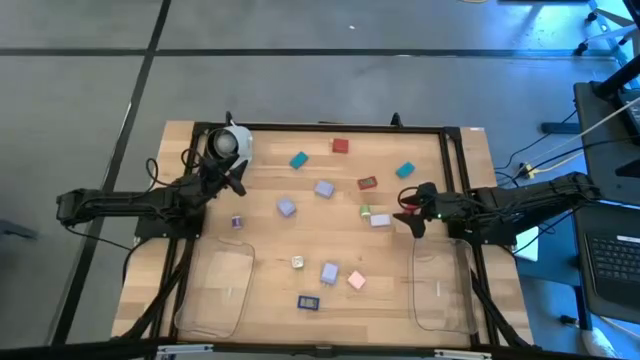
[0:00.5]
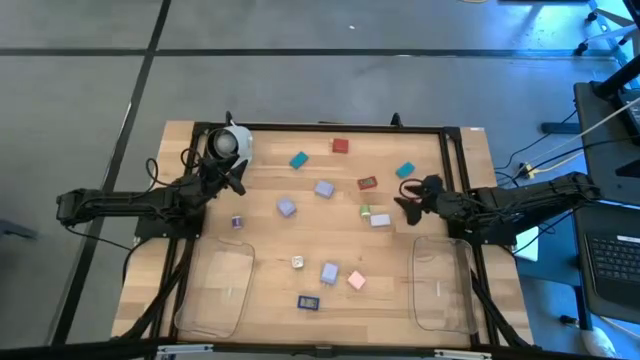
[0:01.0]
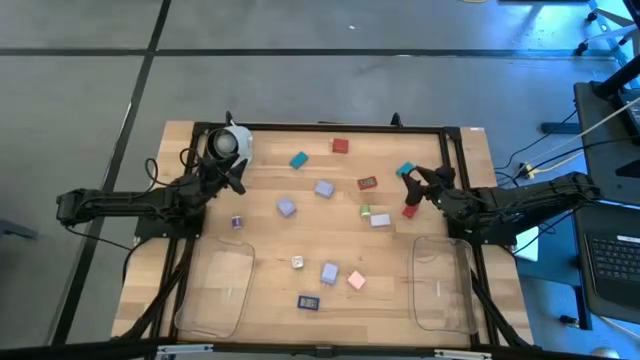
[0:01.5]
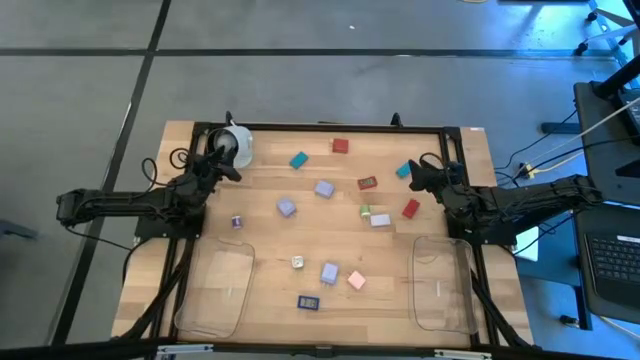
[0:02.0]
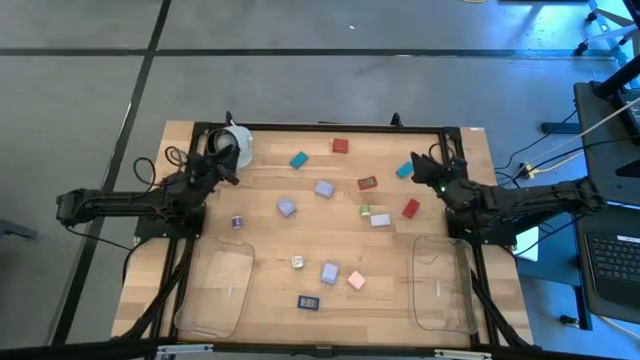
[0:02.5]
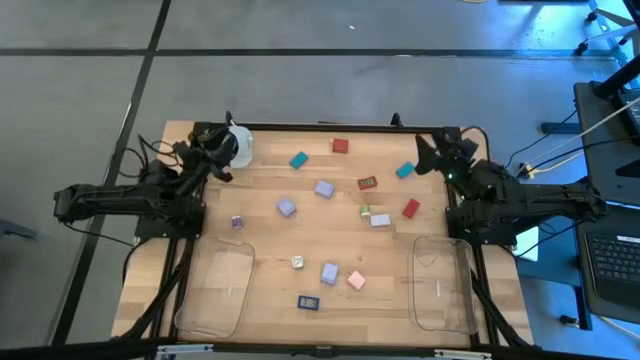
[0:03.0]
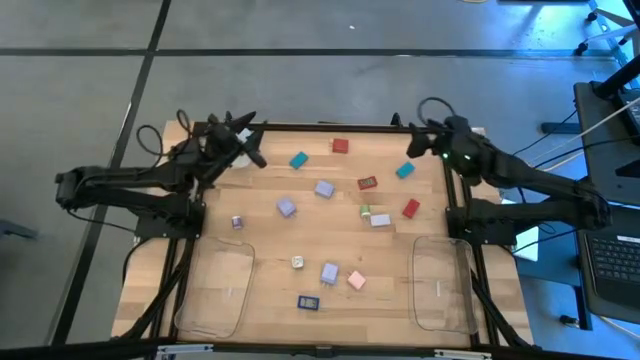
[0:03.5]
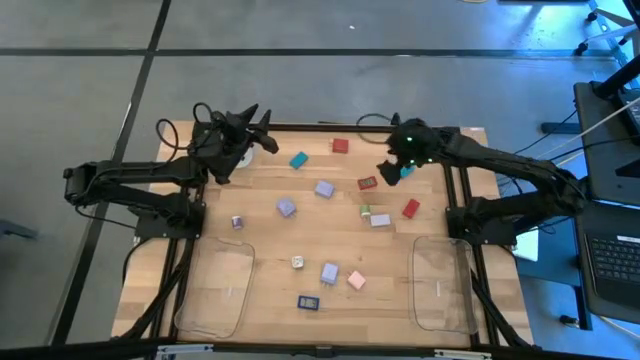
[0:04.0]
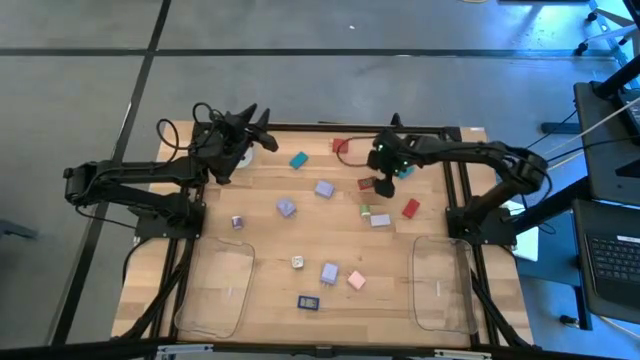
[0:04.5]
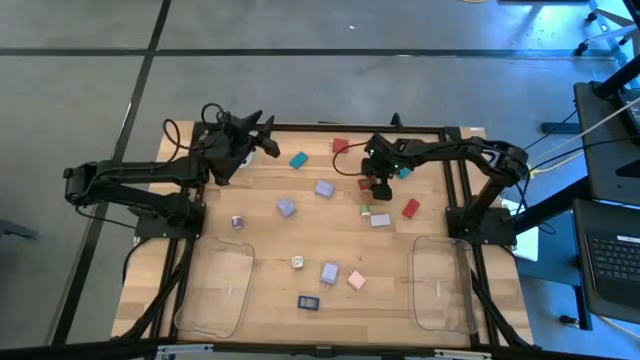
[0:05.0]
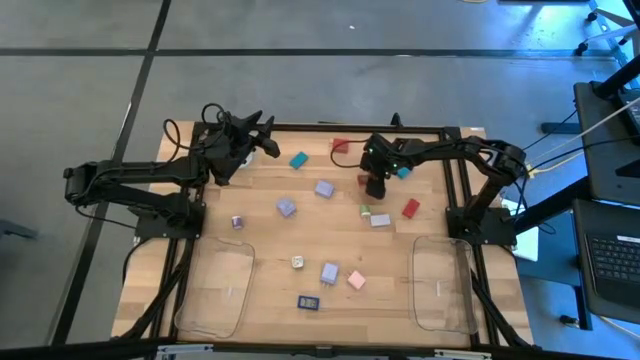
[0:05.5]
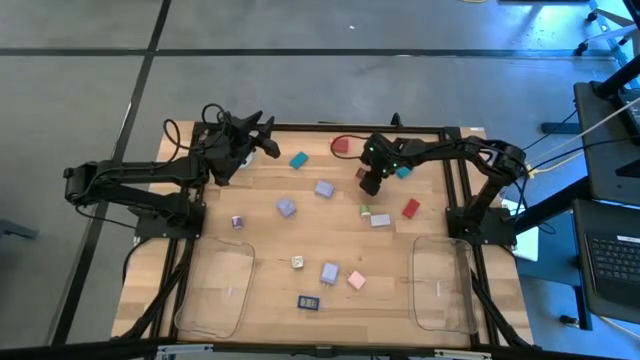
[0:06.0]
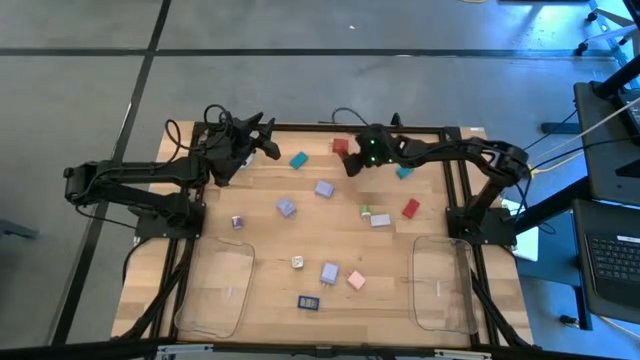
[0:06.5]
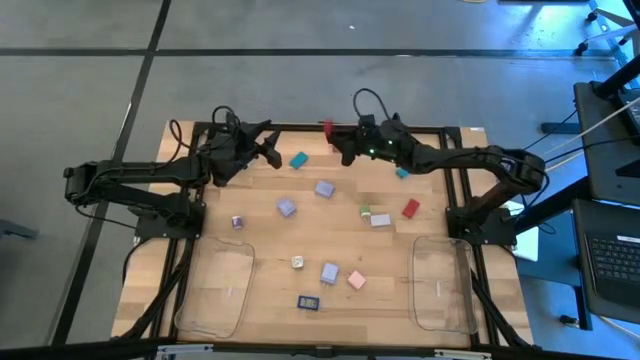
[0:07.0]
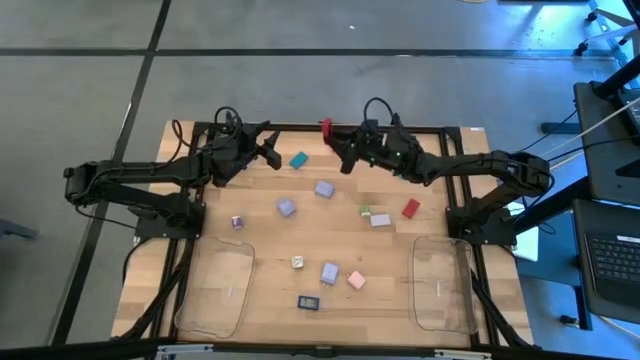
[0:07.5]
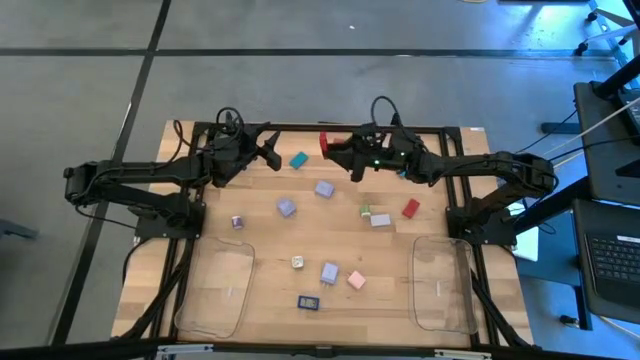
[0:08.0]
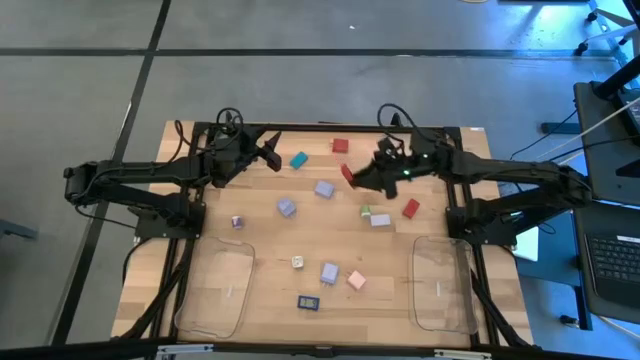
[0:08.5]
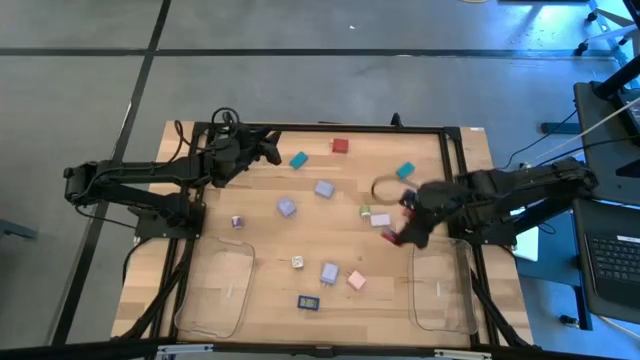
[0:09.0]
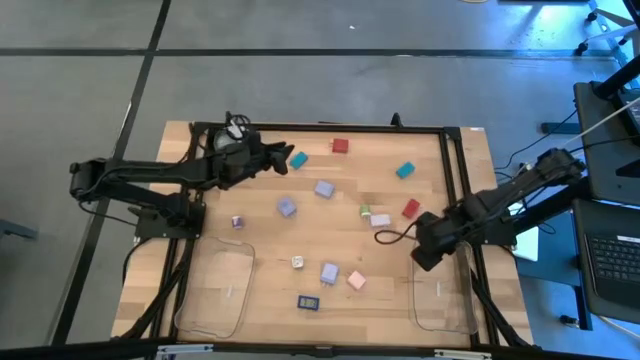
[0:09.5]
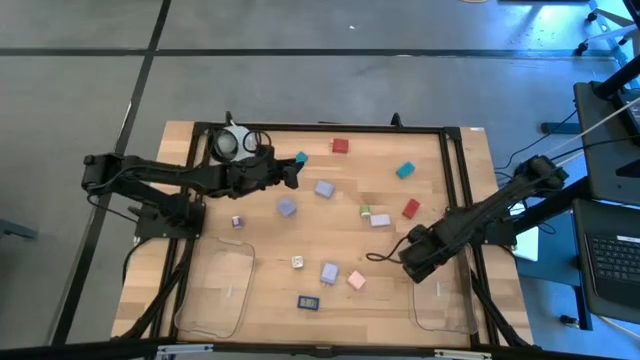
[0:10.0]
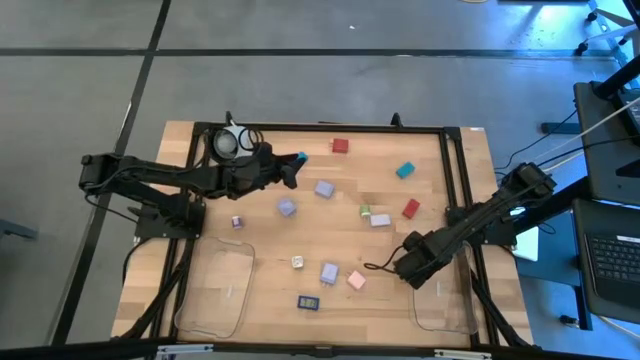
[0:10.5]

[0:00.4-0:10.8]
Task: Pick & Place Office items
Put the left orange timer into the right transparent bin

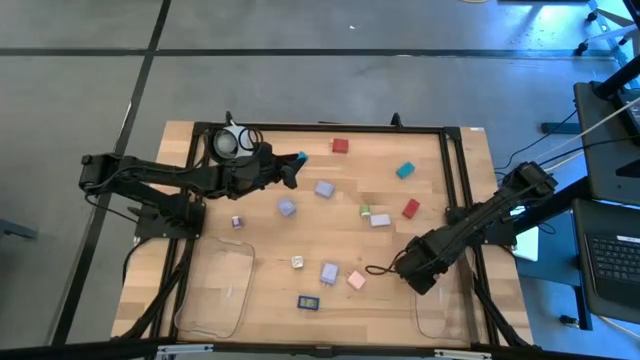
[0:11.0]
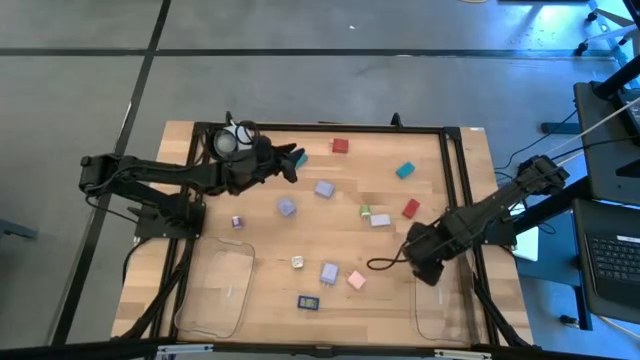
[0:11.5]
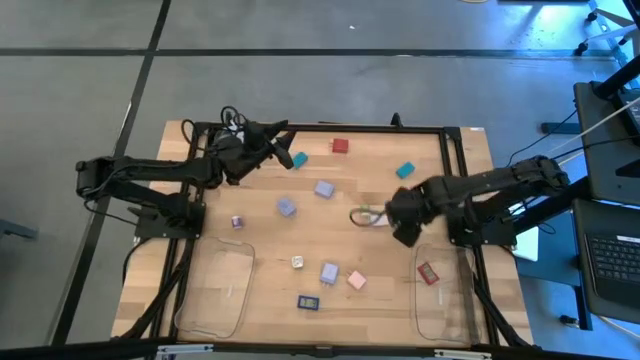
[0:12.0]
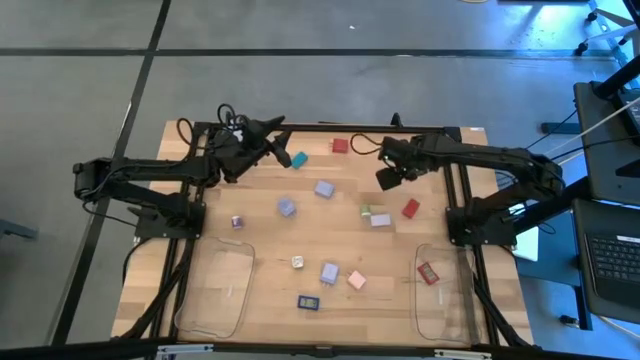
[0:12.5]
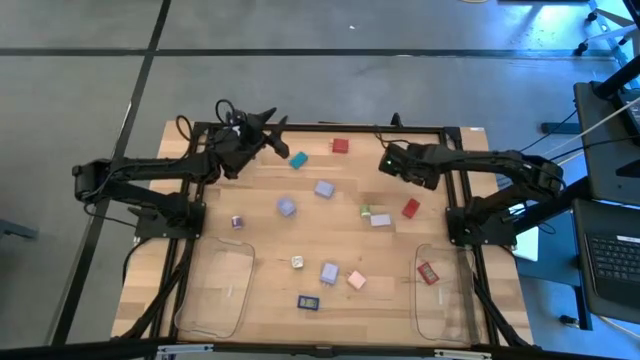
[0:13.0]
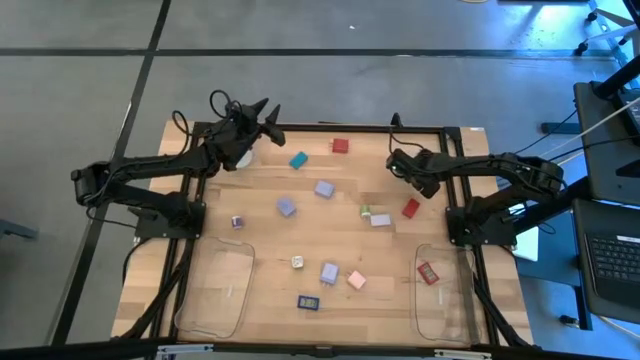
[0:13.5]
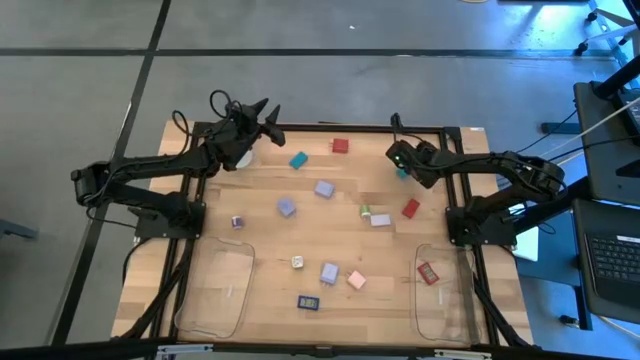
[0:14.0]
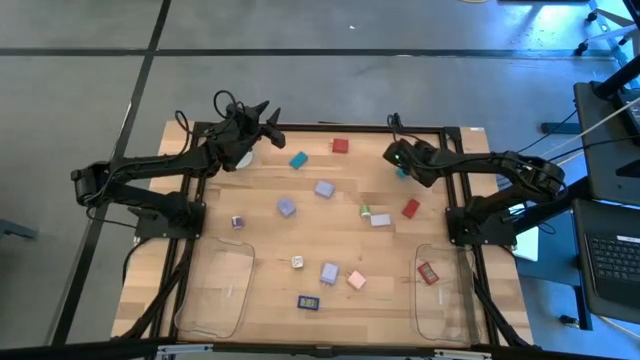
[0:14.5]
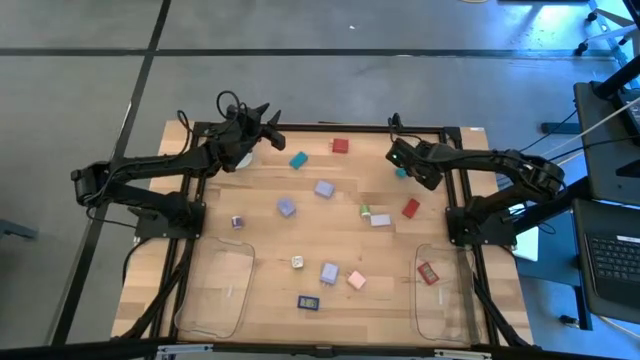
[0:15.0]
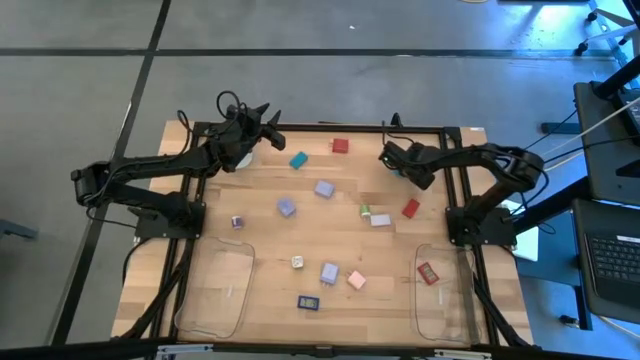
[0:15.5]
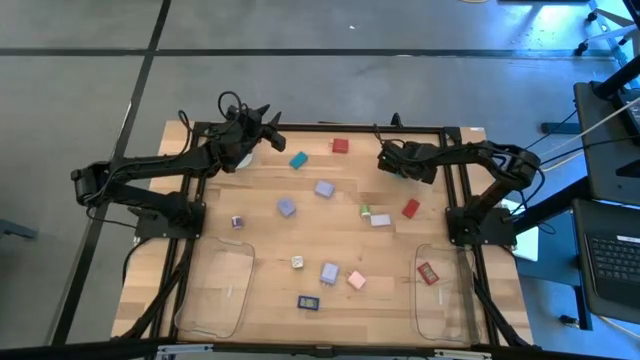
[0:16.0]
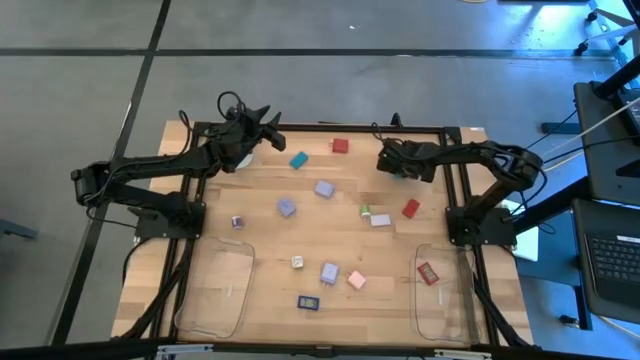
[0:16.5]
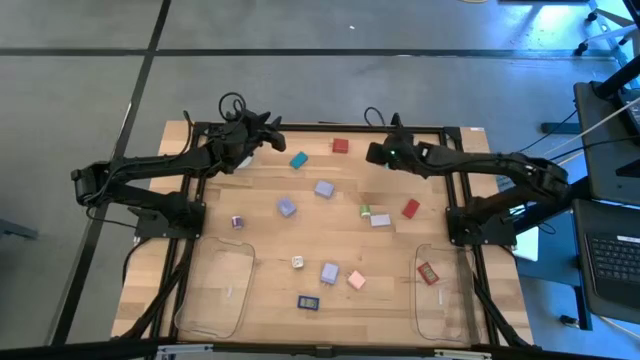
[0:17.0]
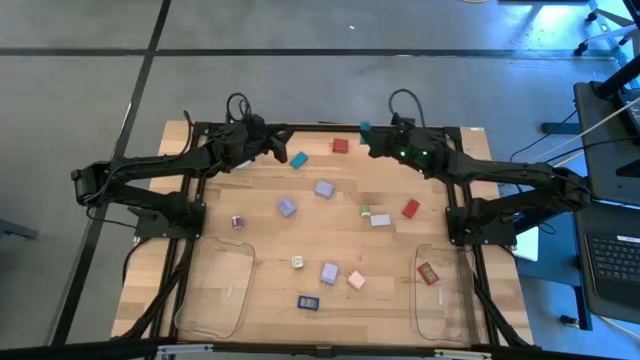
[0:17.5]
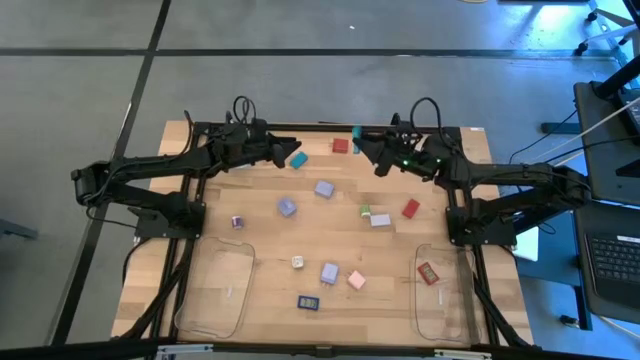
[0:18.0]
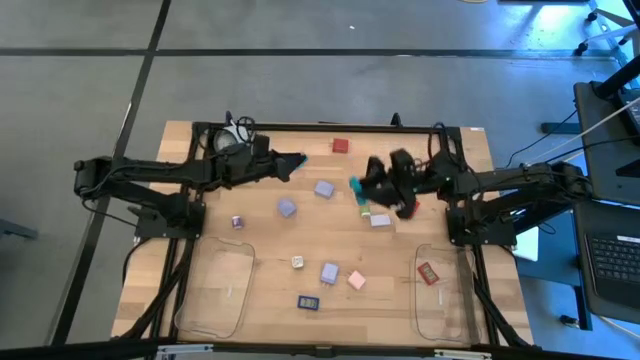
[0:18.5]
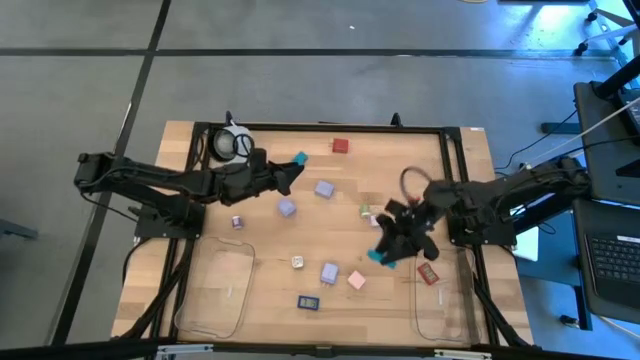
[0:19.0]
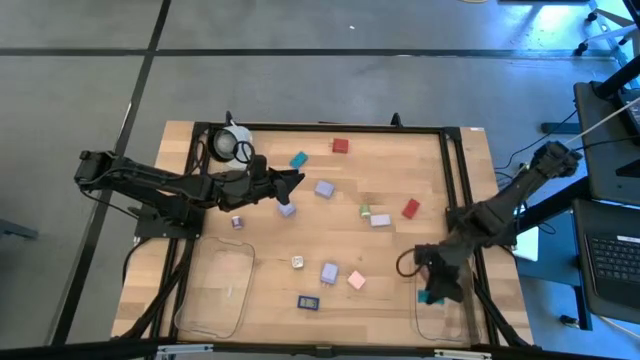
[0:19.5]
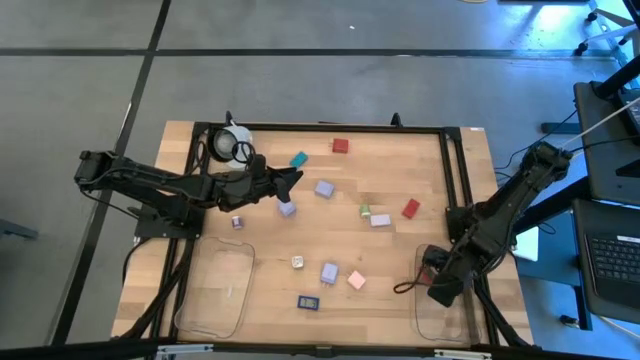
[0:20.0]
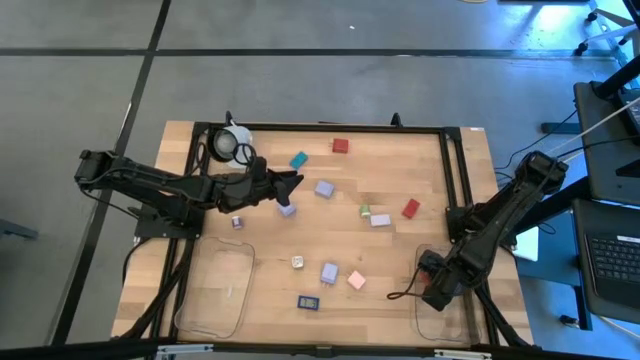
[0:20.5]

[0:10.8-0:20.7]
Put the right light blue timer into the right transparent bin
